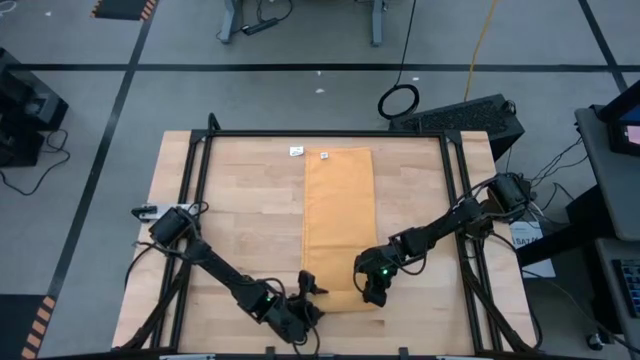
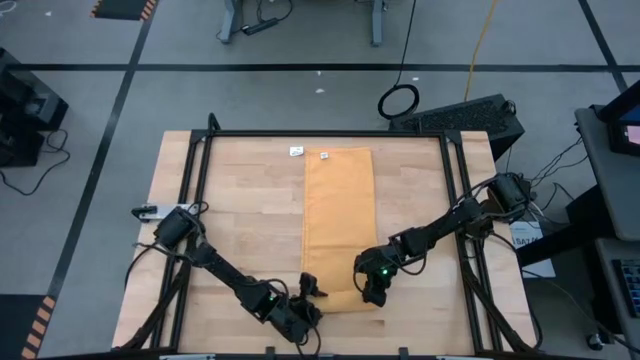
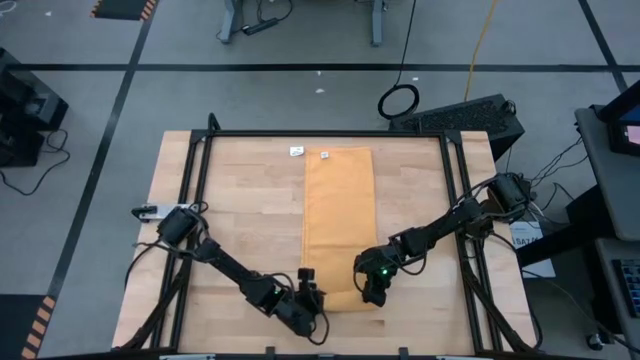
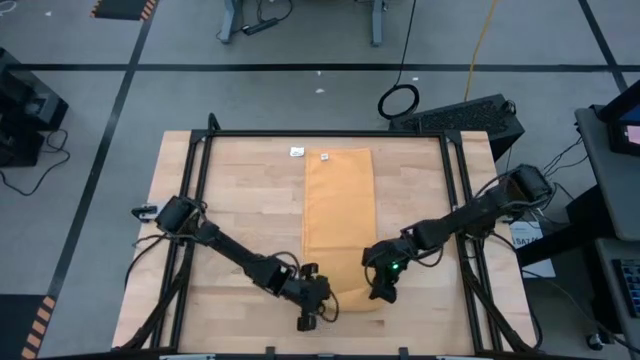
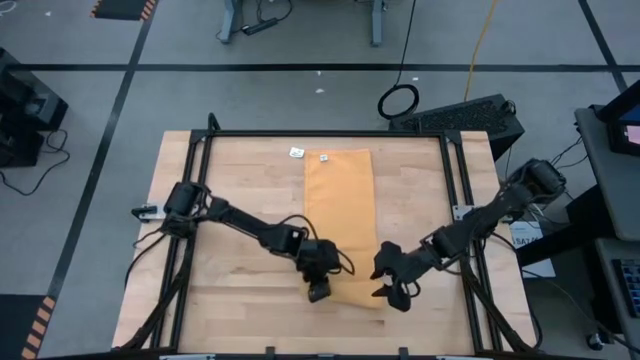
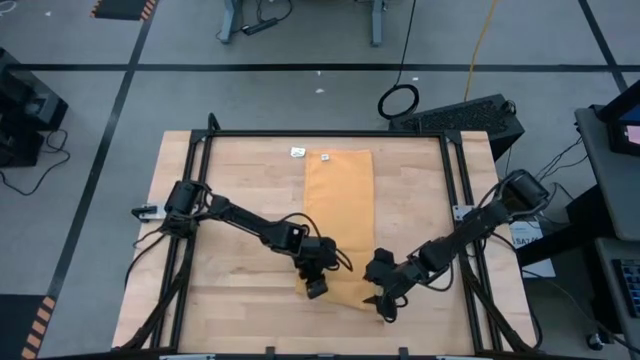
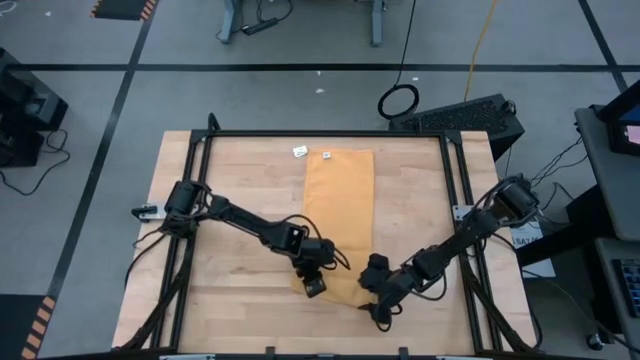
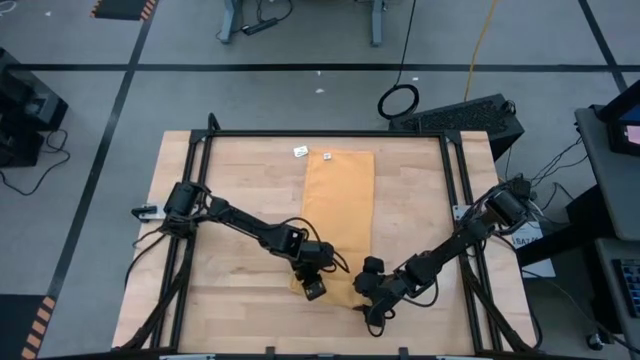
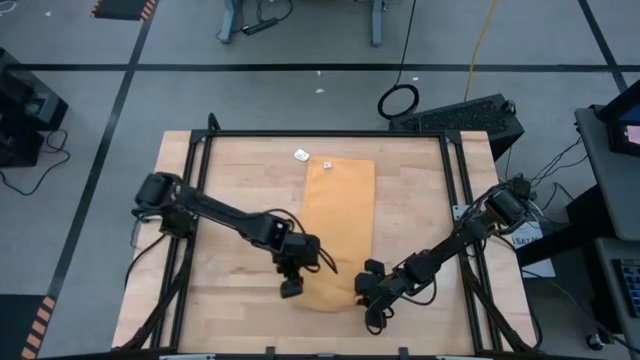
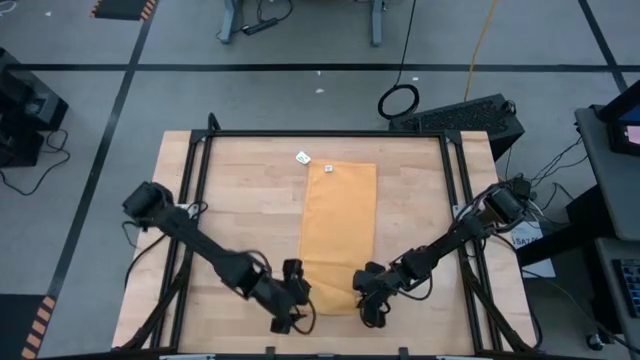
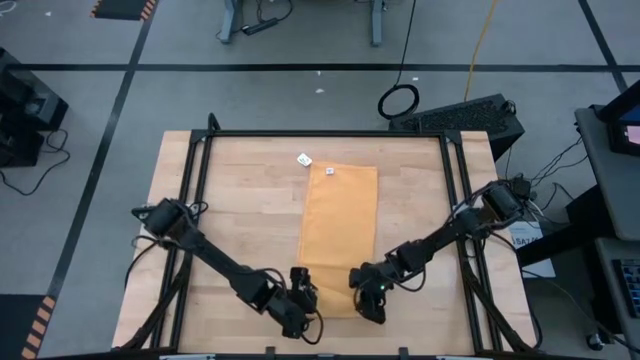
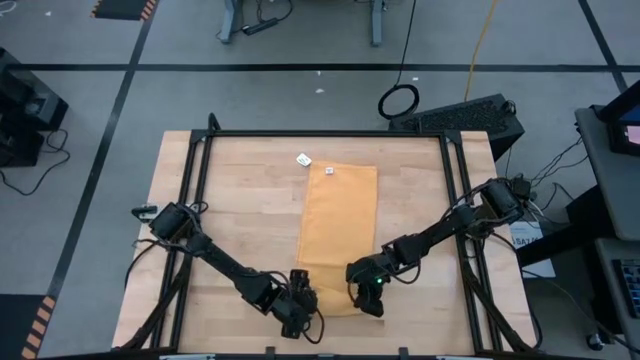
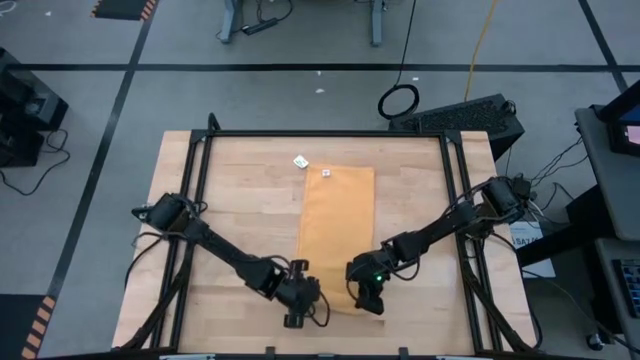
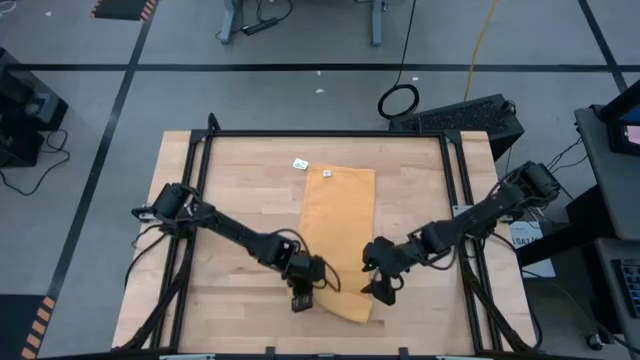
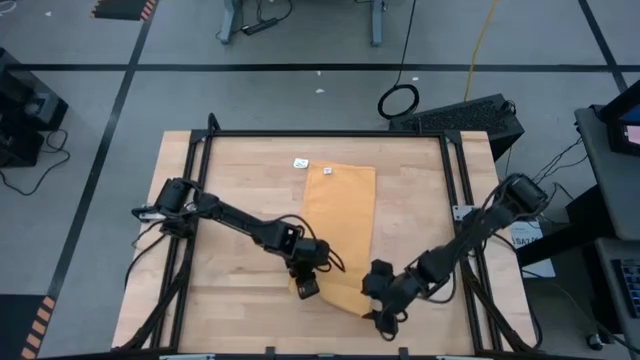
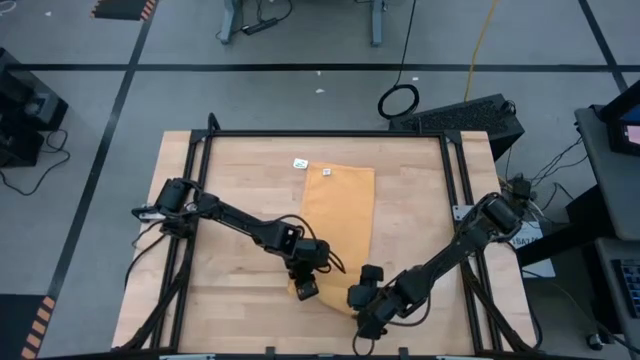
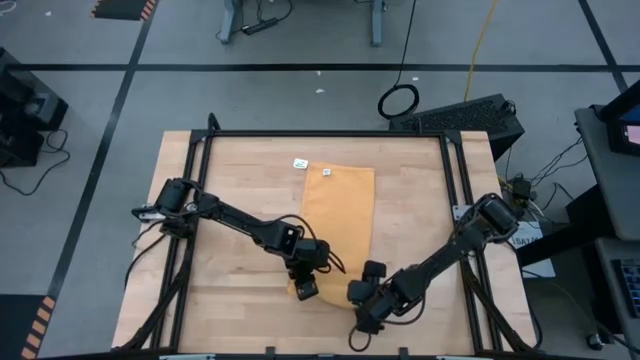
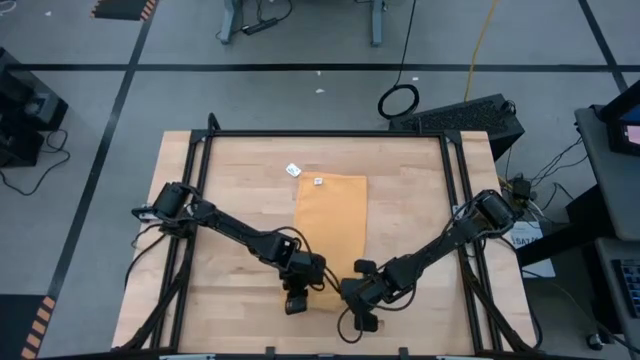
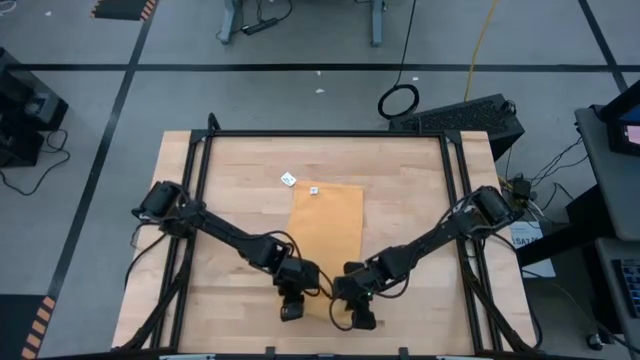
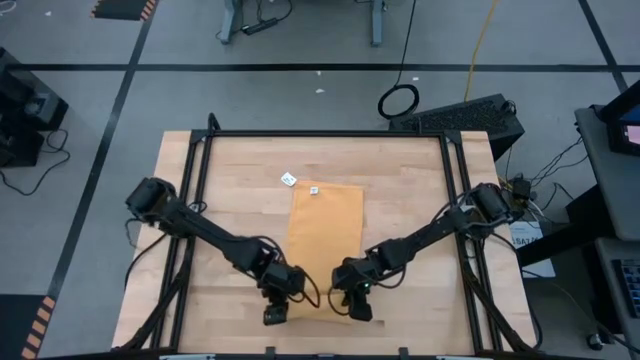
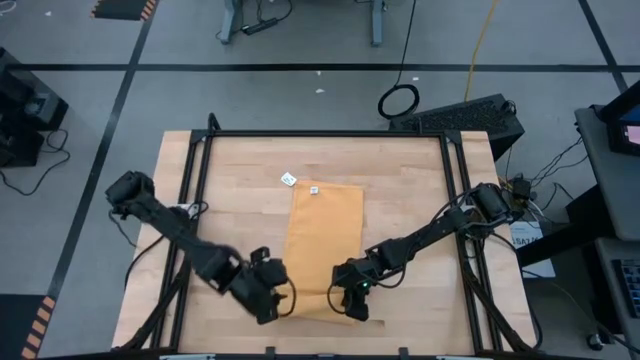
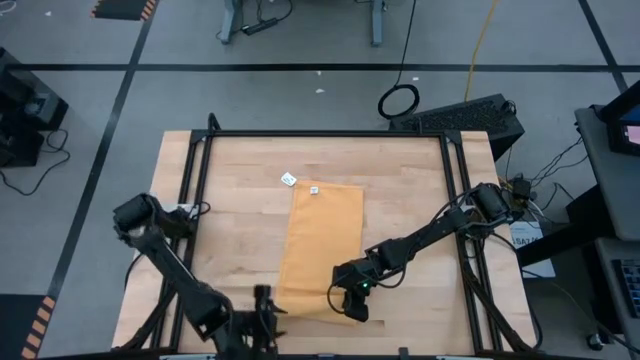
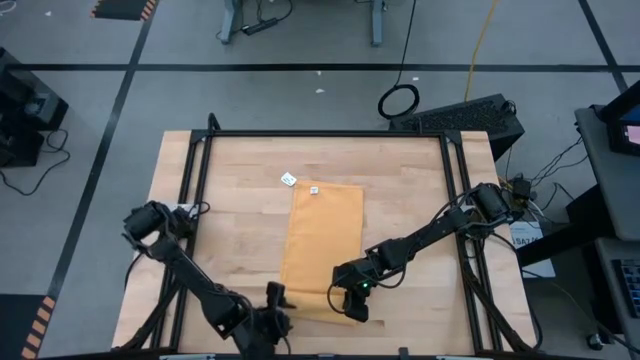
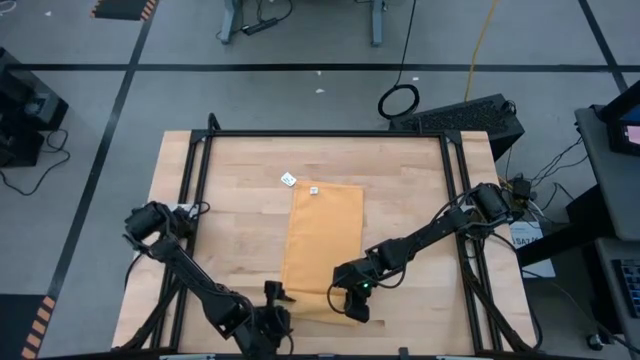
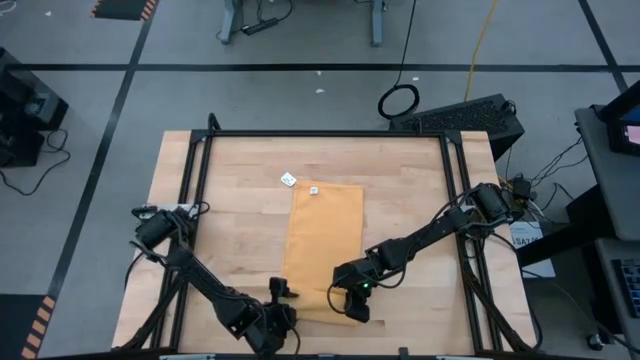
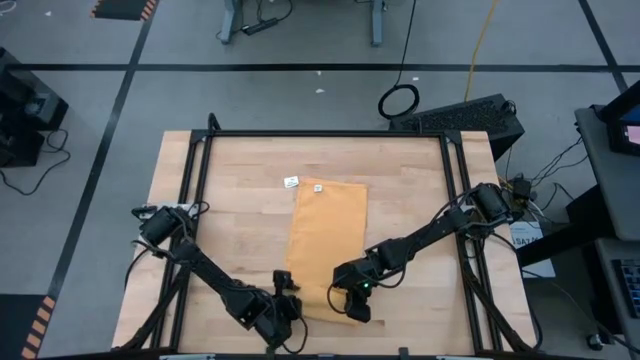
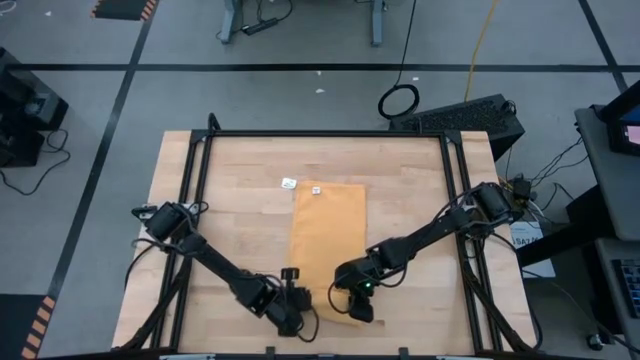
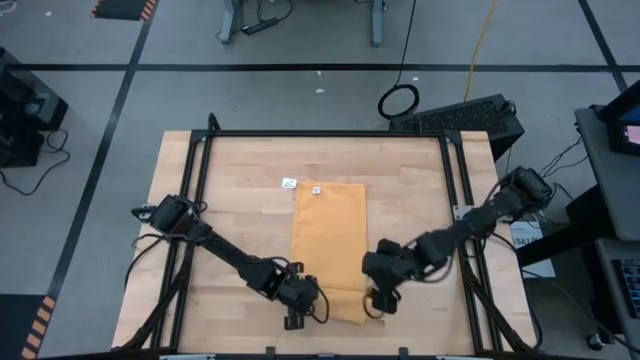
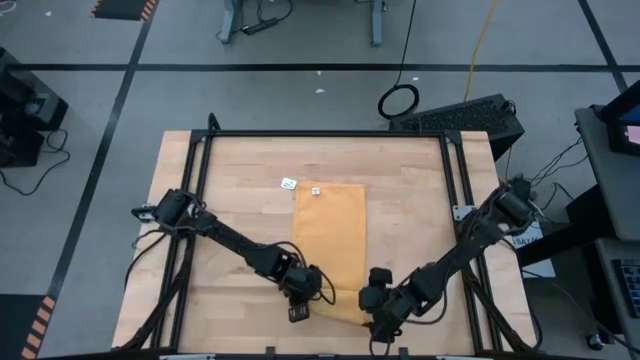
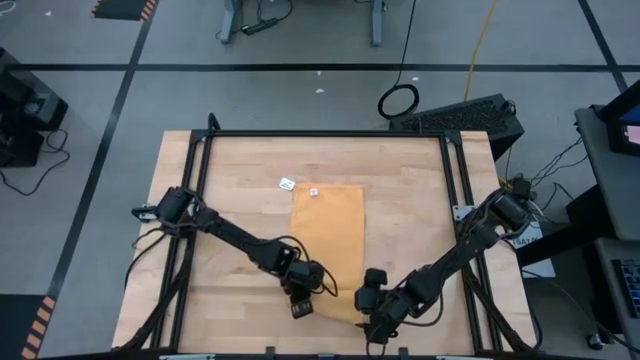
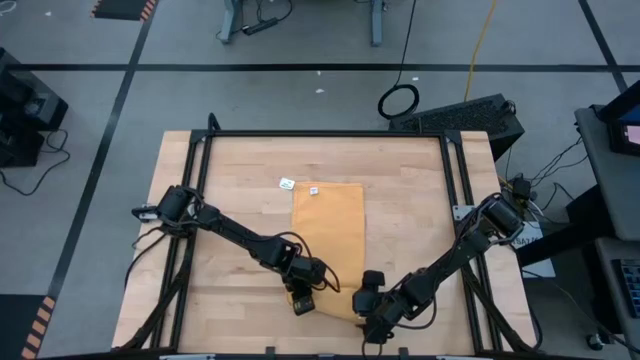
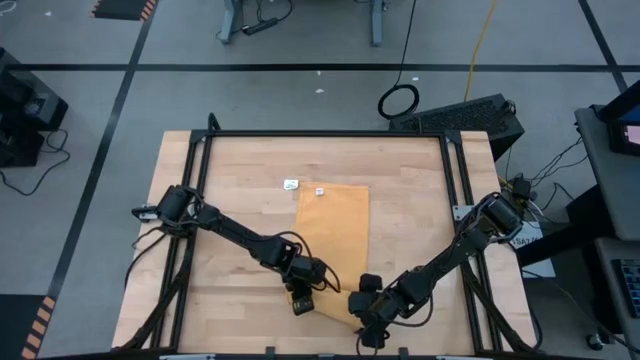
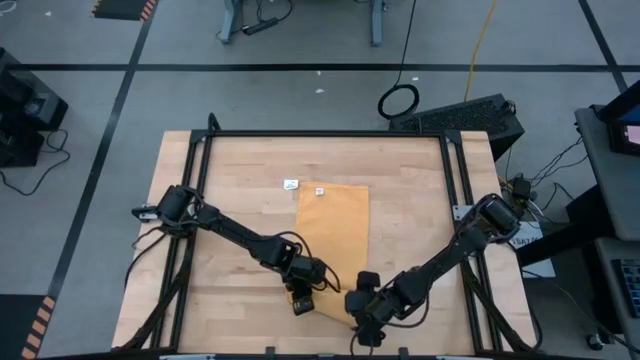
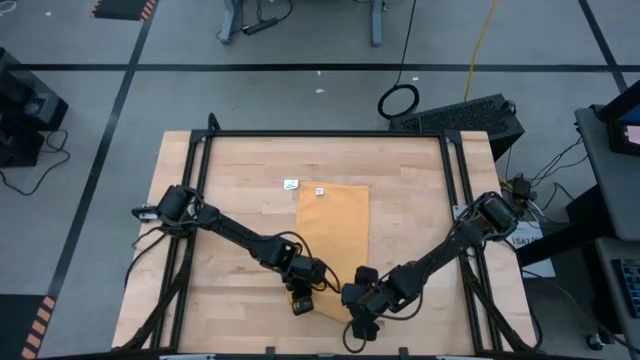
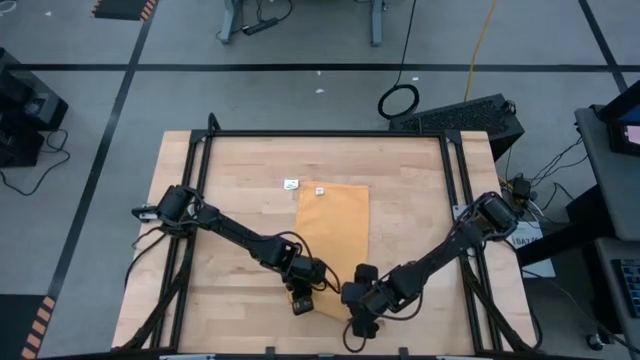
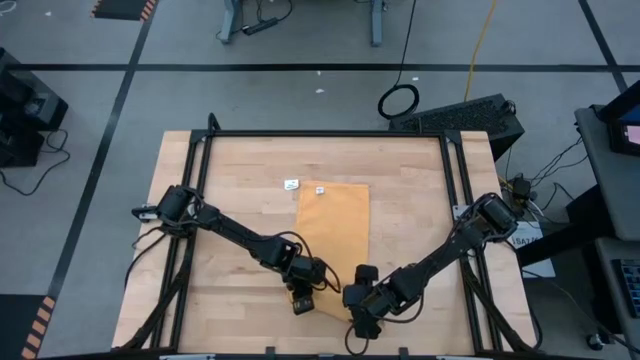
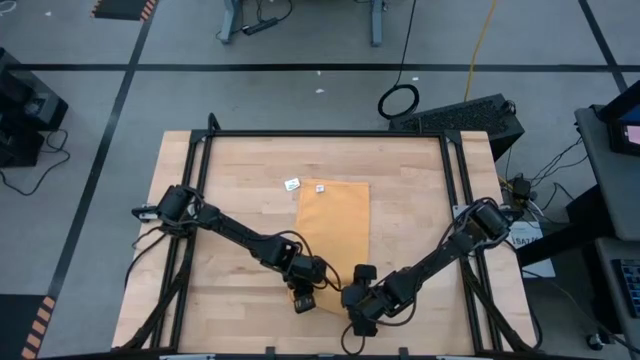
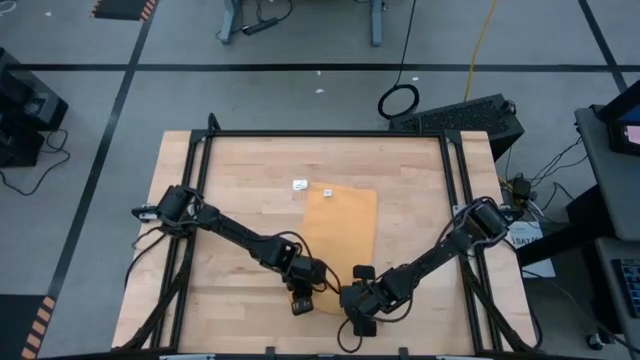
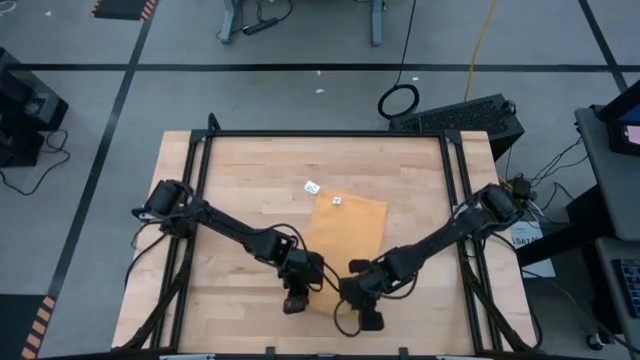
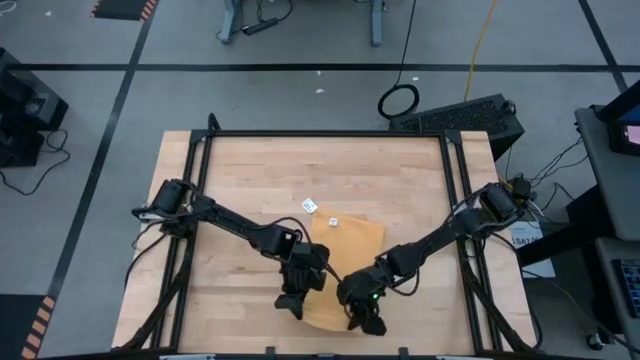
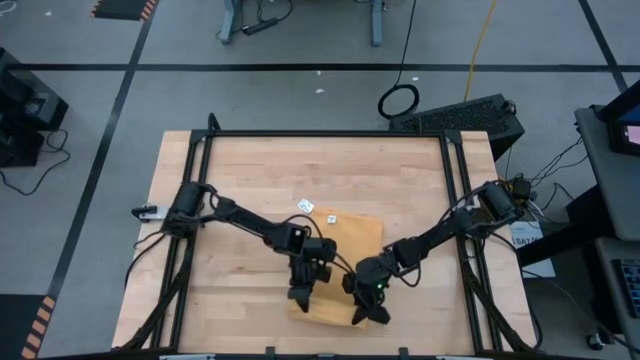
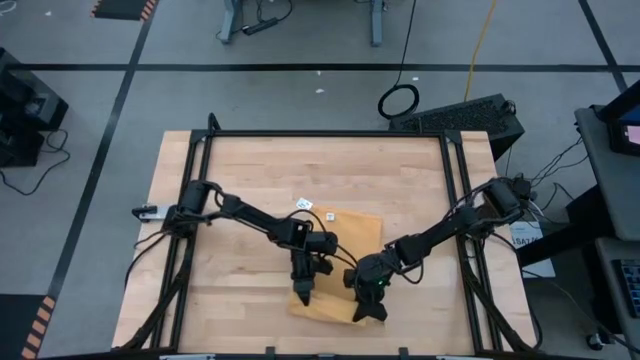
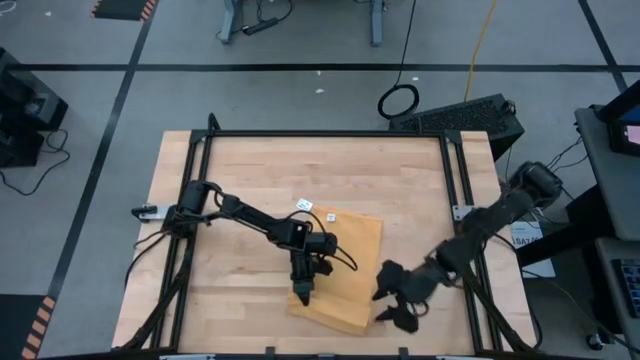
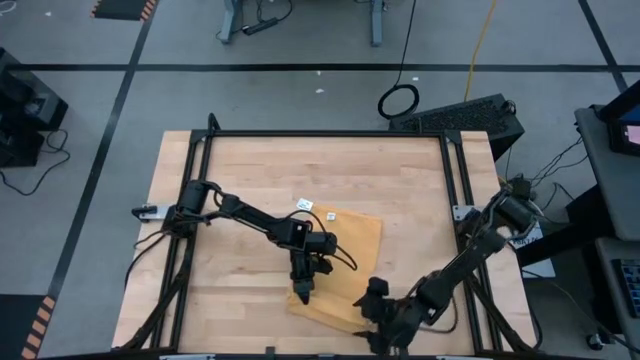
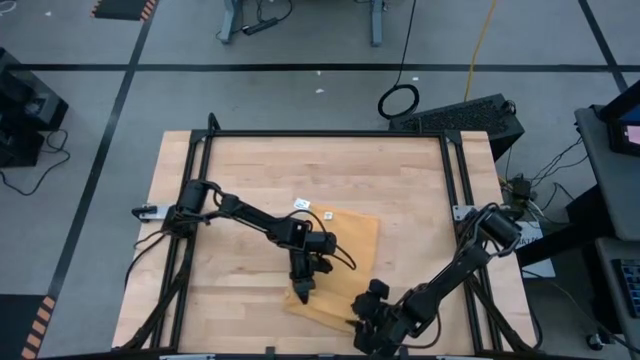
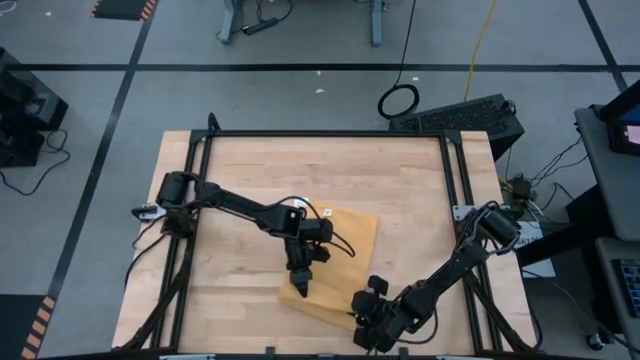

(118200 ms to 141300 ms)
Task: Roll towel into tight, uniform cylinder
Roll the orange towel
